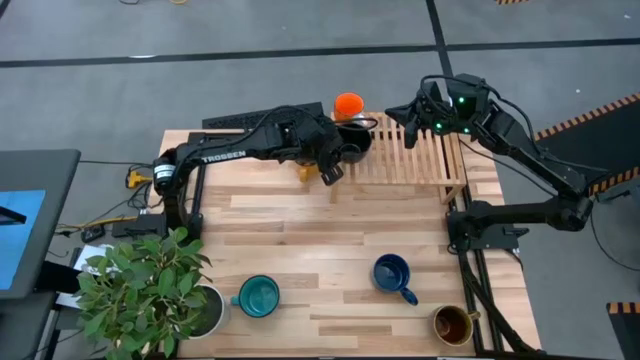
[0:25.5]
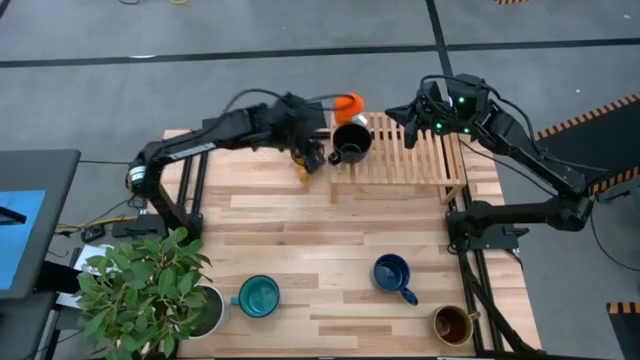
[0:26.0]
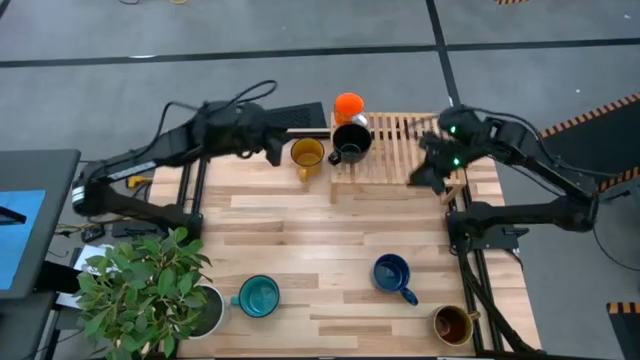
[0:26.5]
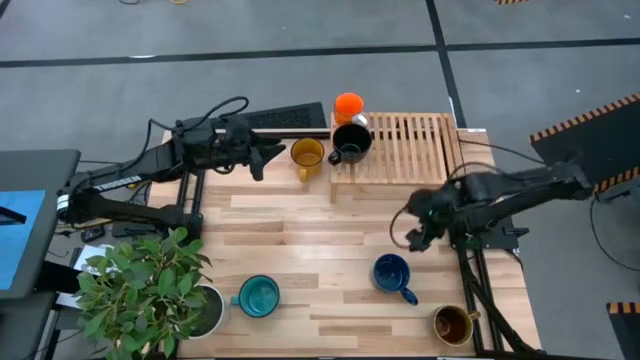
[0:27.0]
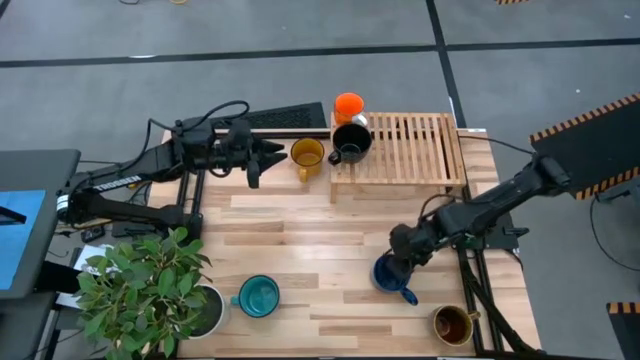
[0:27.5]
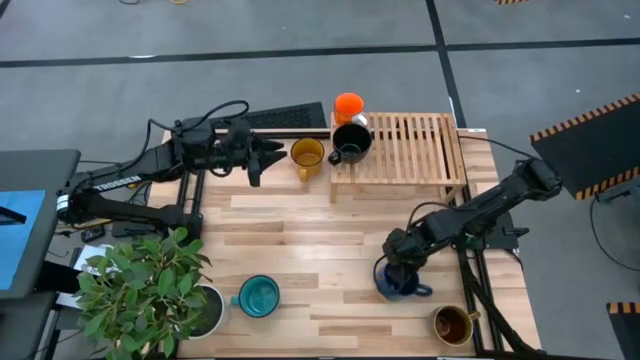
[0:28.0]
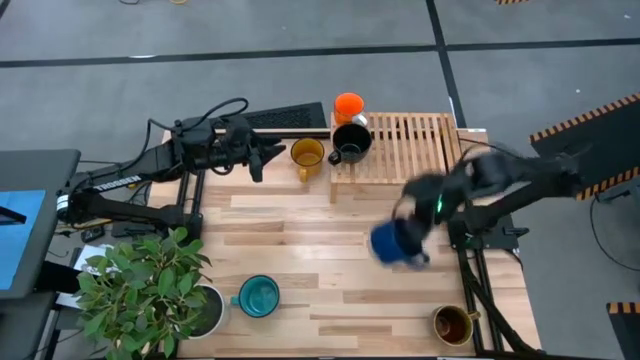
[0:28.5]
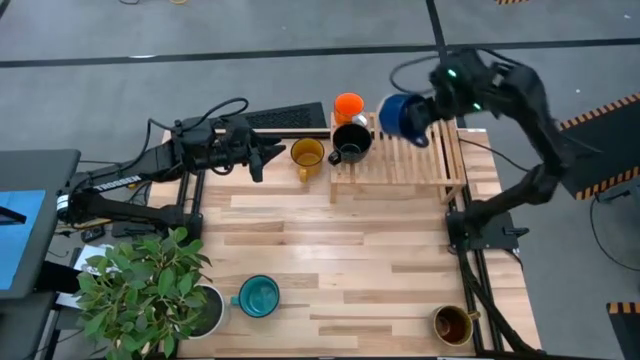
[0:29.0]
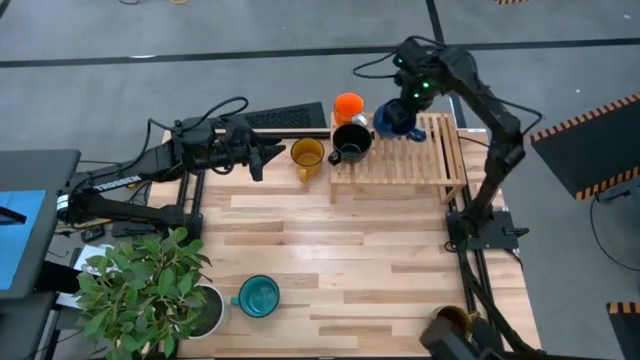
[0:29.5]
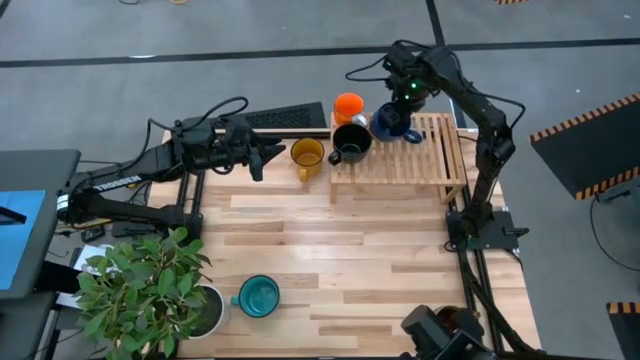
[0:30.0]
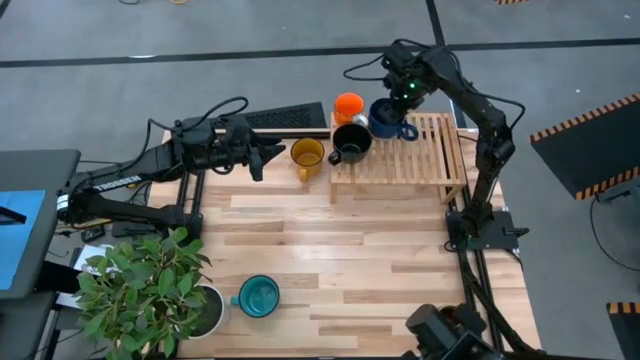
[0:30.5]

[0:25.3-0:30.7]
Task: Place coffee mugs
Put the blue mug on the shelf

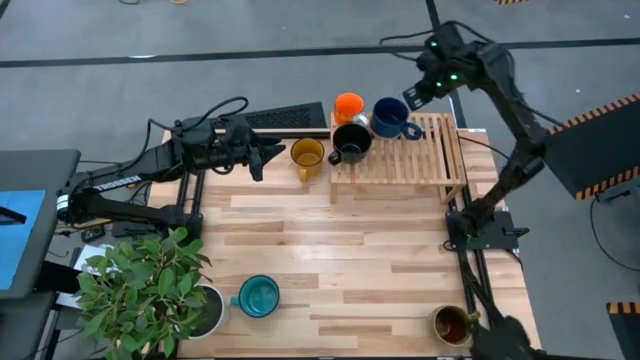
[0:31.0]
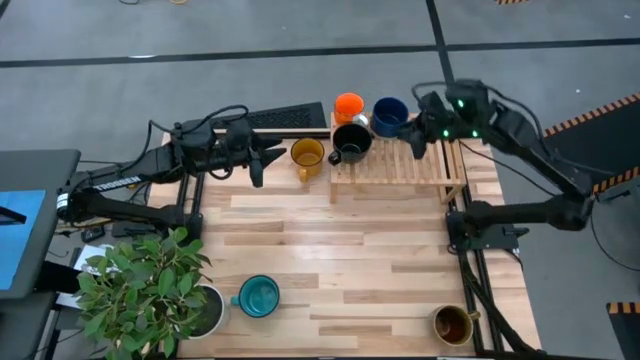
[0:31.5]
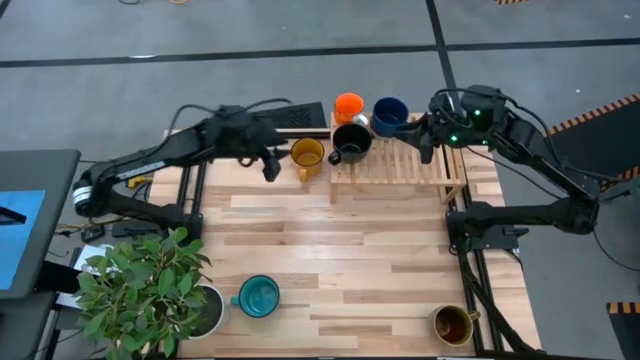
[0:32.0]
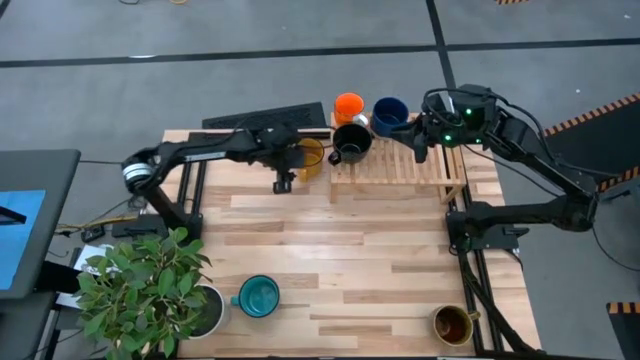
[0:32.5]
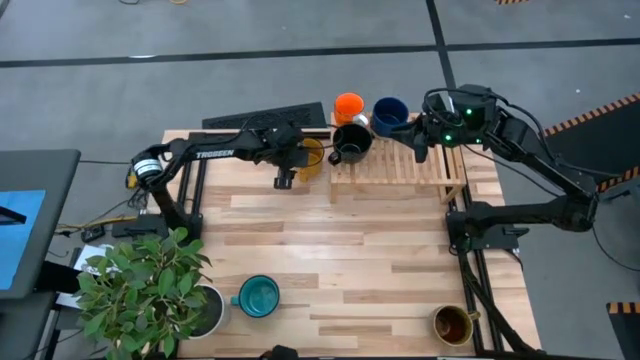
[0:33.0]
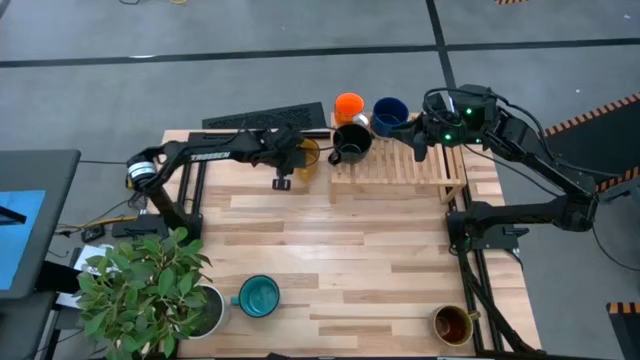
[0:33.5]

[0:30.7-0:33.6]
Move the yellow mug to the center of the table

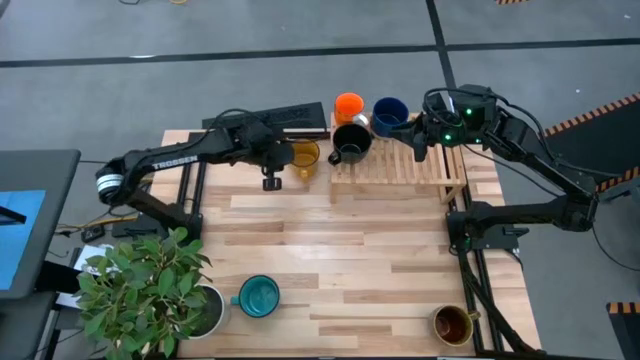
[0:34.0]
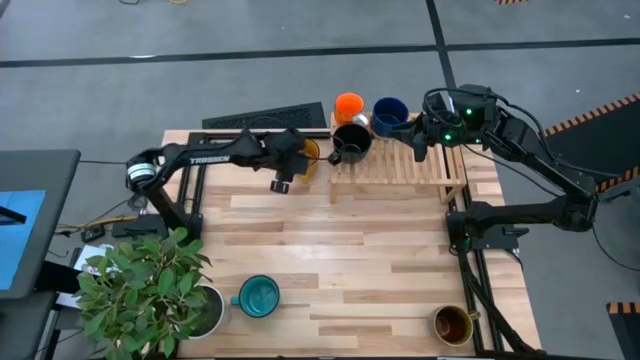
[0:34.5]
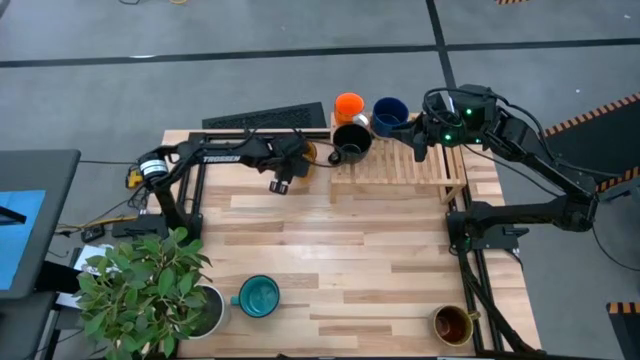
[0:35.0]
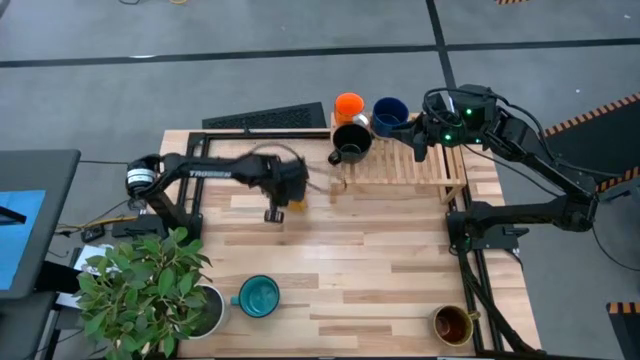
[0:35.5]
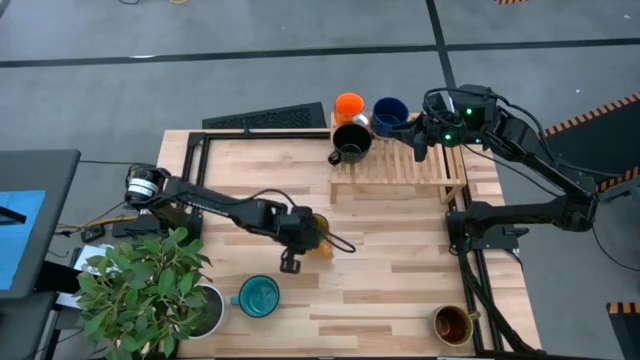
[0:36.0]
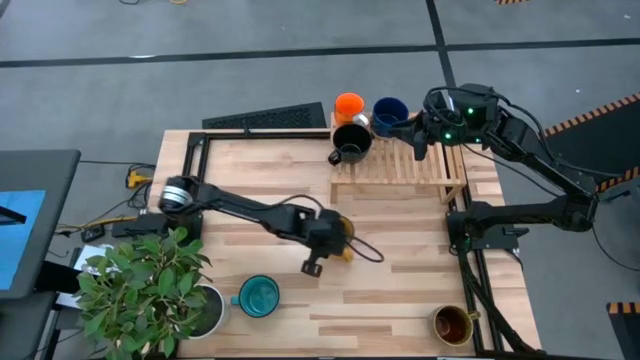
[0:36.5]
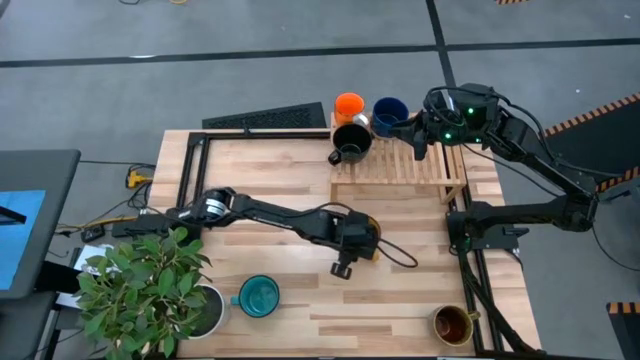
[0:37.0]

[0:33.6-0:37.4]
Move the yellow mug to the center of the table

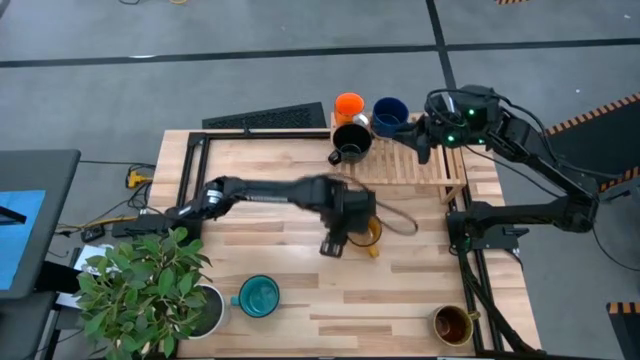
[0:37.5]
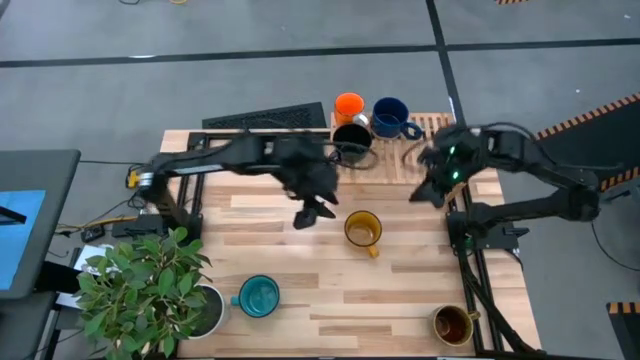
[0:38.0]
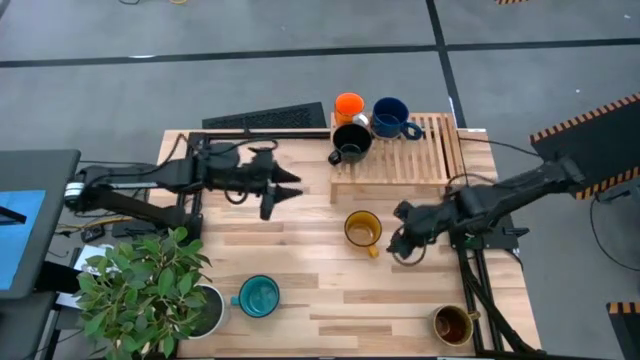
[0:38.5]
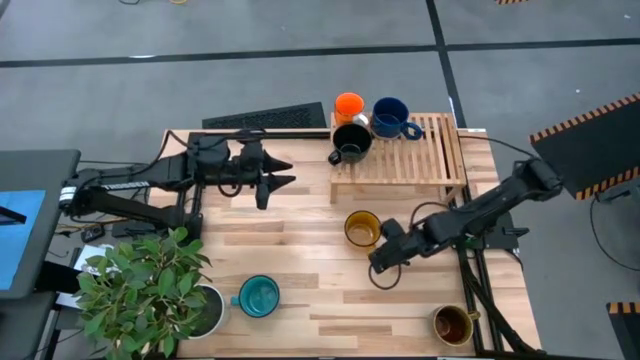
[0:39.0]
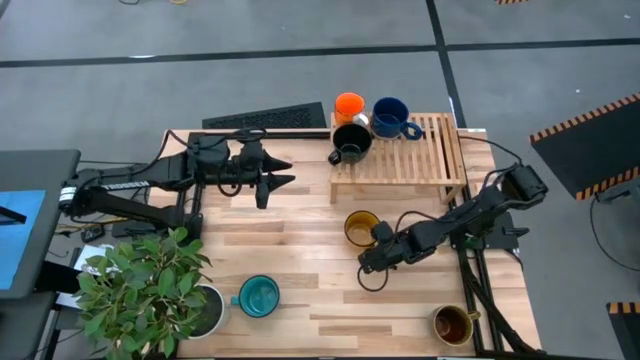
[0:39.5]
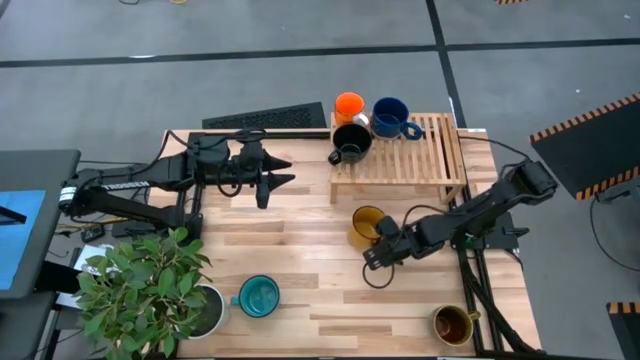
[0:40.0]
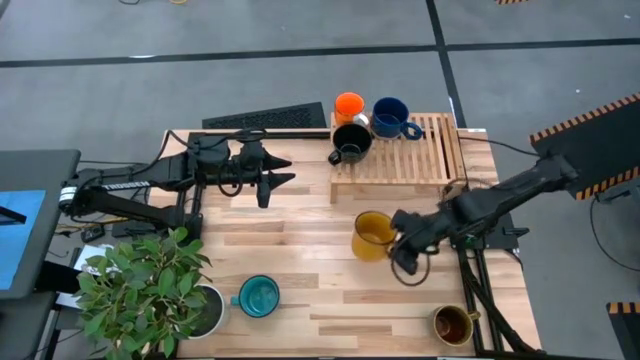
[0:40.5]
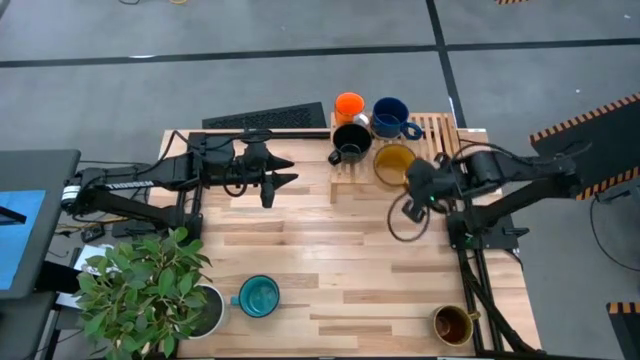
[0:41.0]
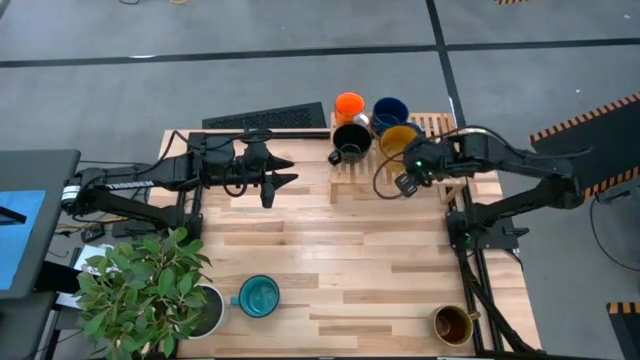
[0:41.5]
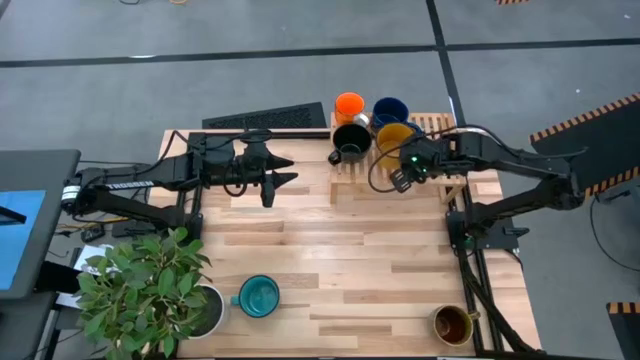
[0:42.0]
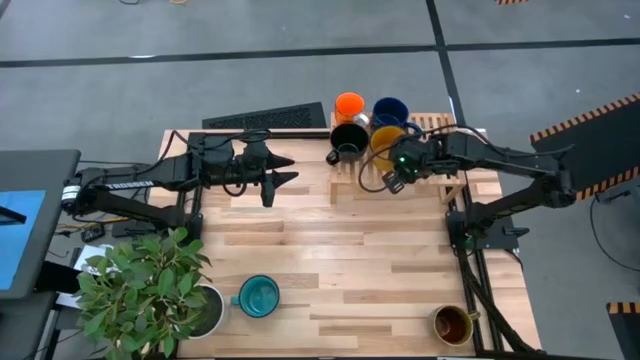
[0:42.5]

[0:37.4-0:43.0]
Put the yellow mug on the shelf

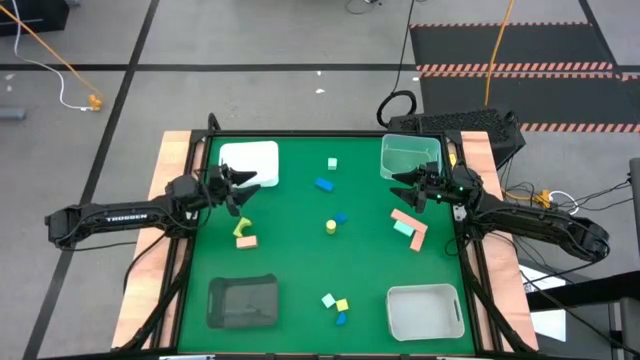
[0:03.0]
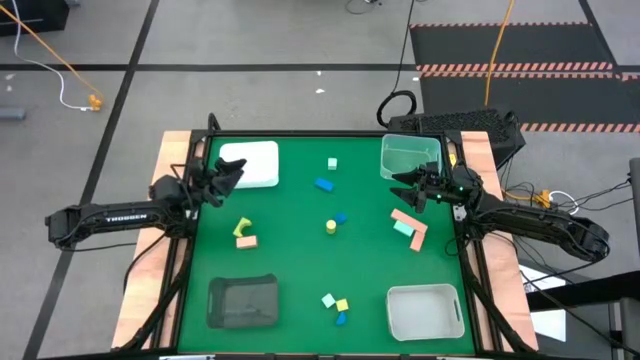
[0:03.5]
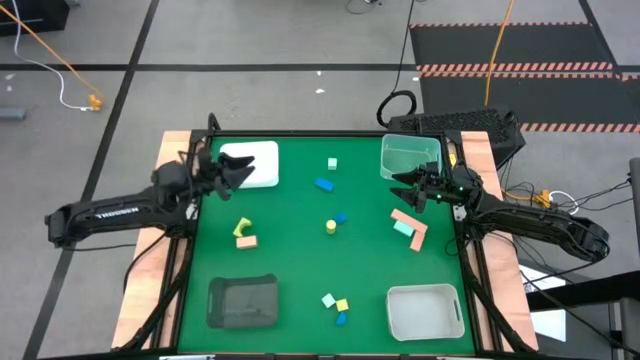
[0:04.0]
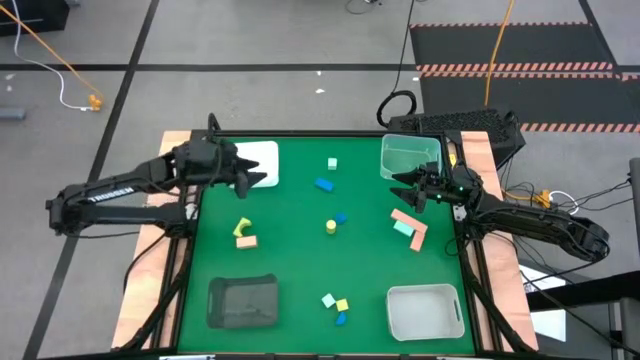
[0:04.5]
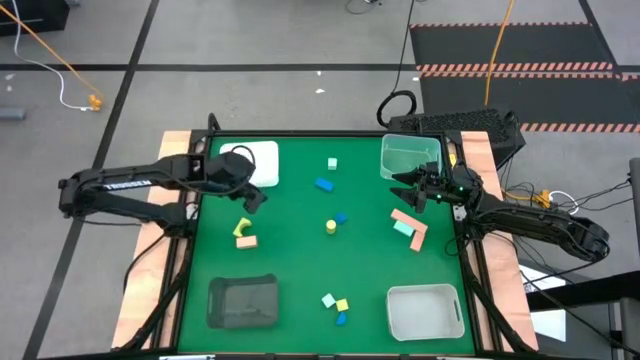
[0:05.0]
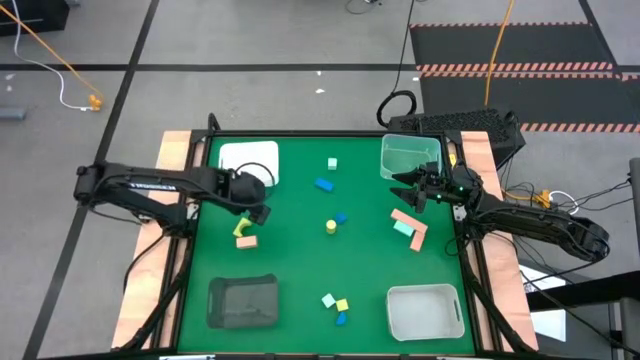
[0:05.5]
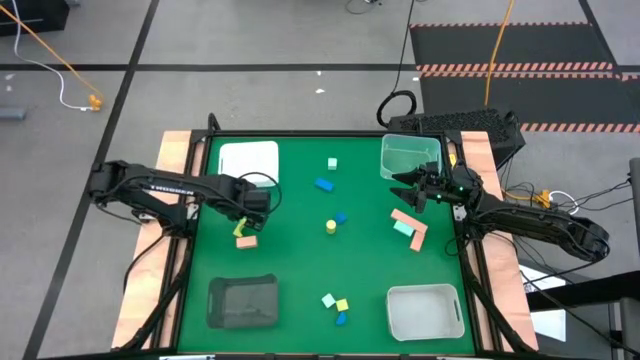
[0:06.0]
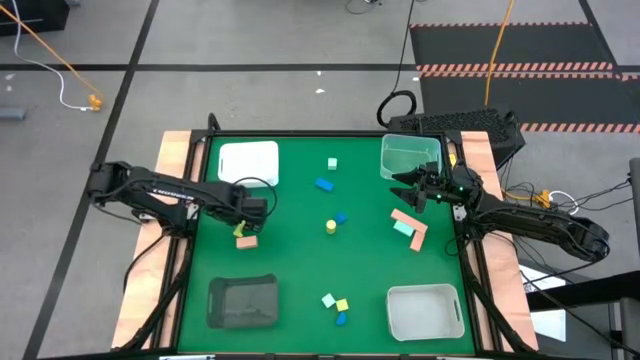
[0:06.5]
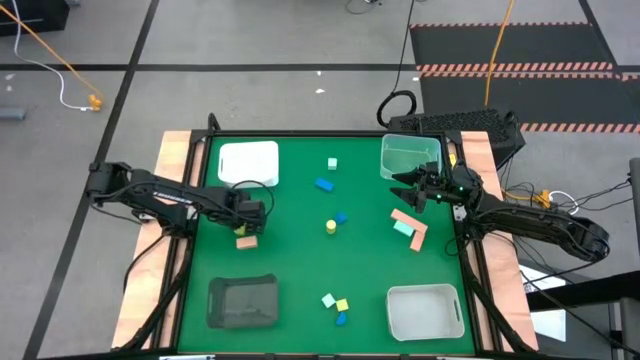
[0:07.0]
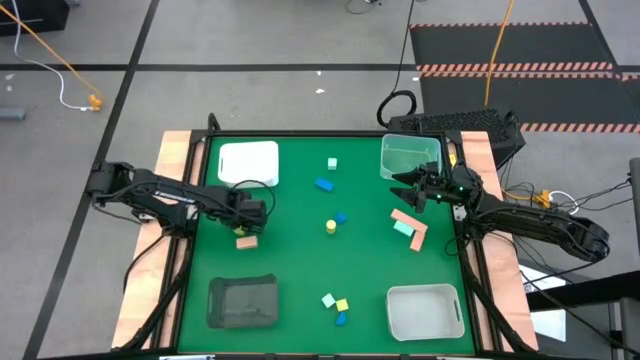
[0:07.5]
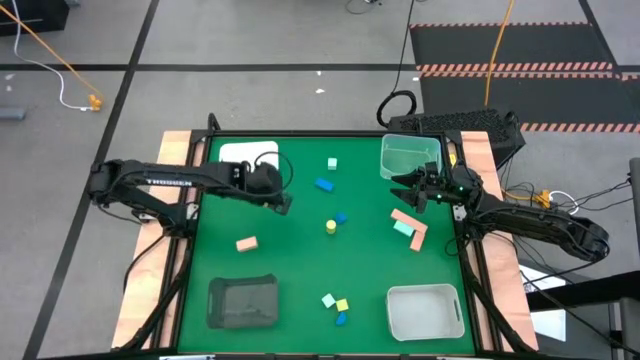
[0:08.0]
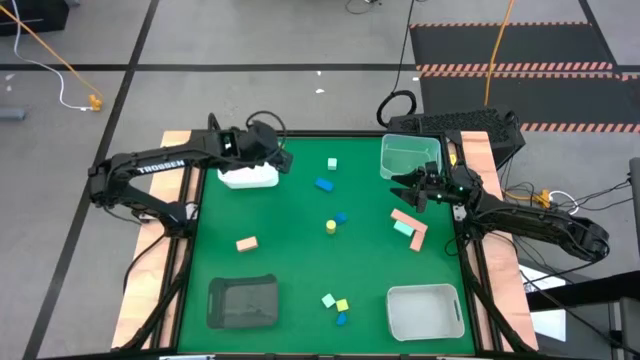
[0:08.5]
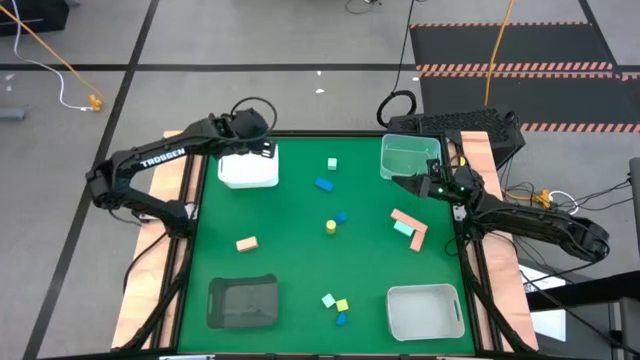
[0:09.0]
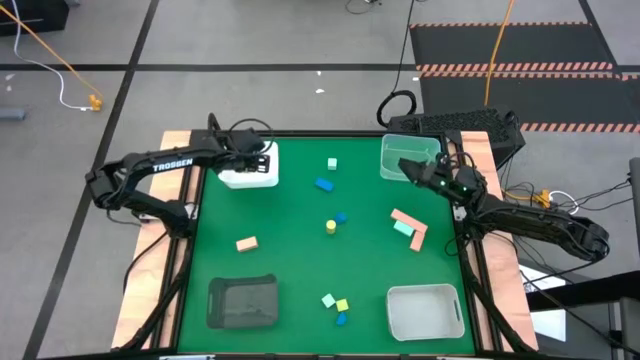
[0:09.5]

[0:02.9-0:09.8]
Task: Sort & place blocks by color
Put the top left green block into the white bin
